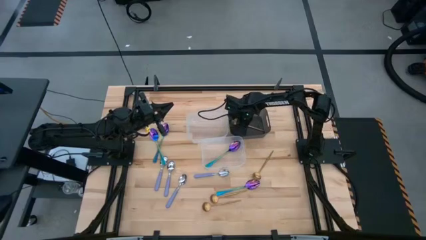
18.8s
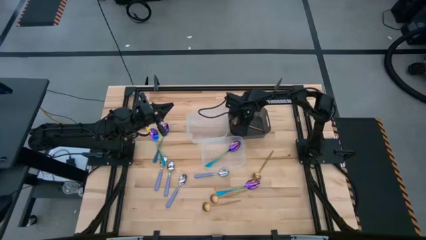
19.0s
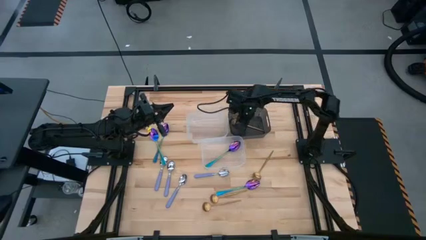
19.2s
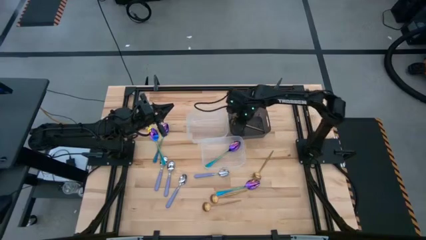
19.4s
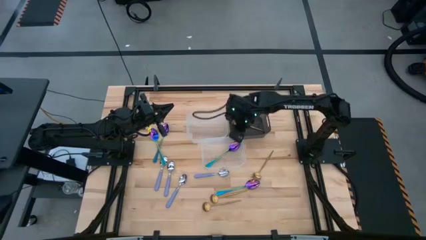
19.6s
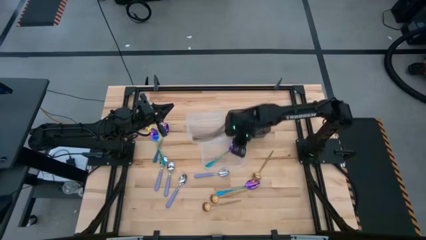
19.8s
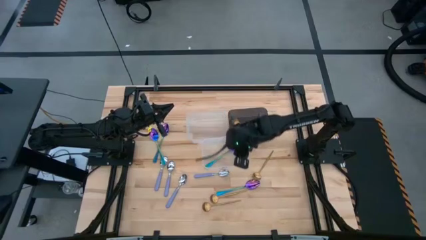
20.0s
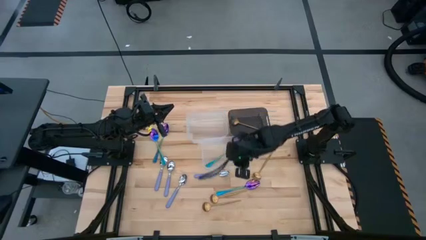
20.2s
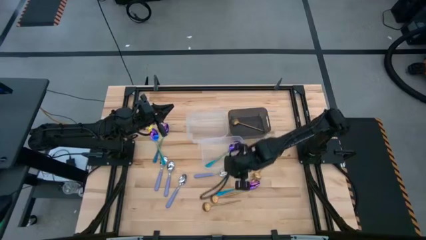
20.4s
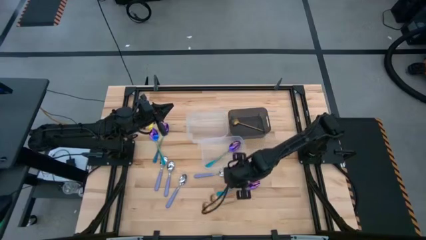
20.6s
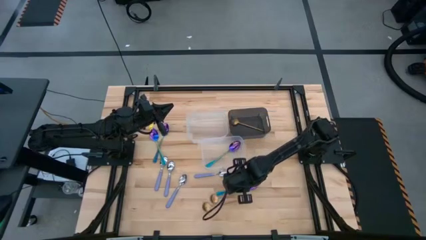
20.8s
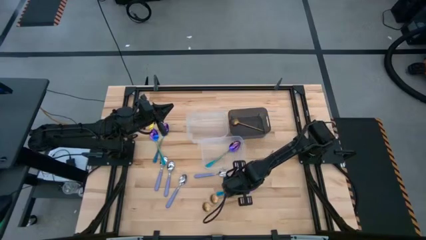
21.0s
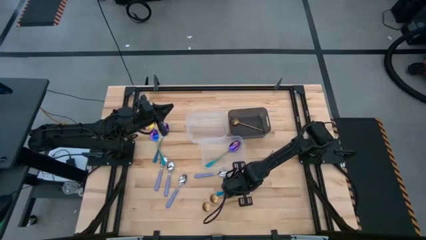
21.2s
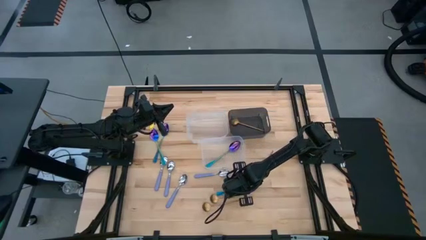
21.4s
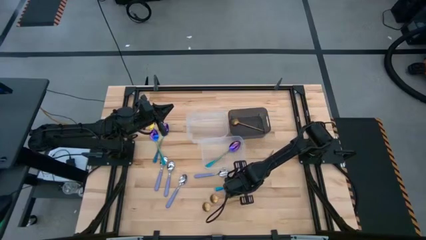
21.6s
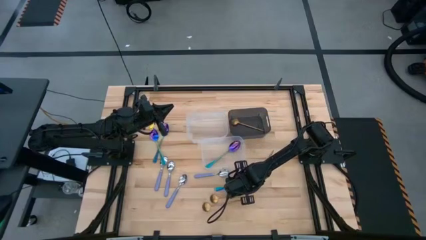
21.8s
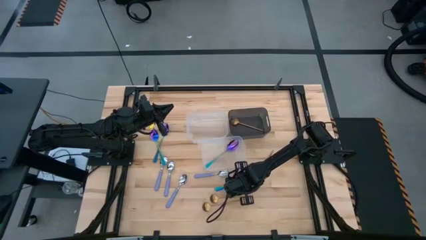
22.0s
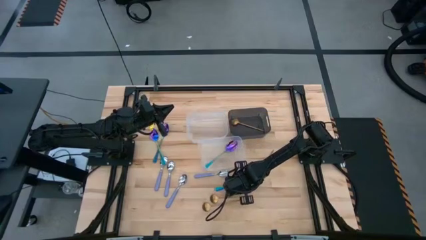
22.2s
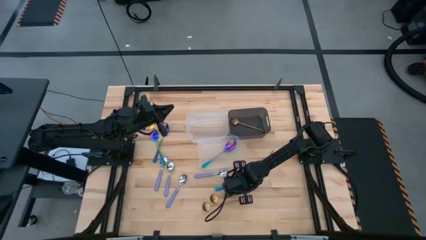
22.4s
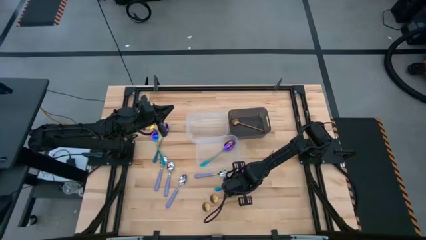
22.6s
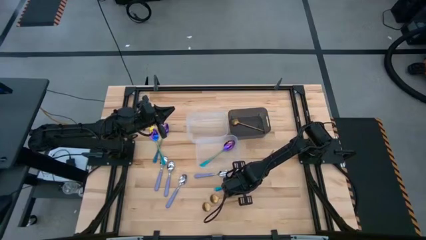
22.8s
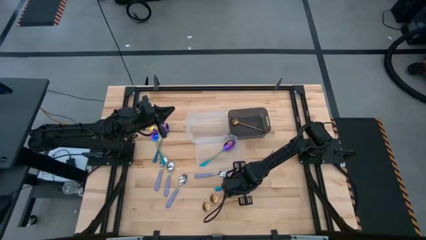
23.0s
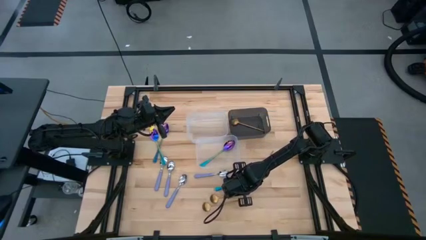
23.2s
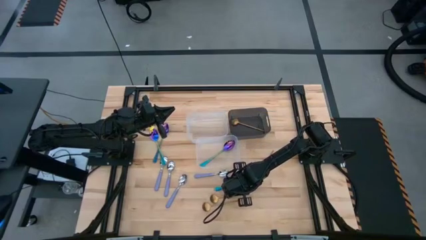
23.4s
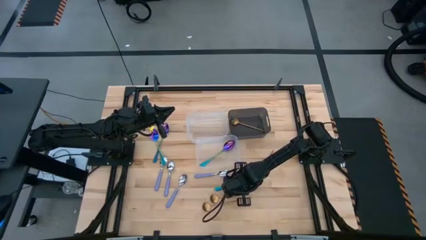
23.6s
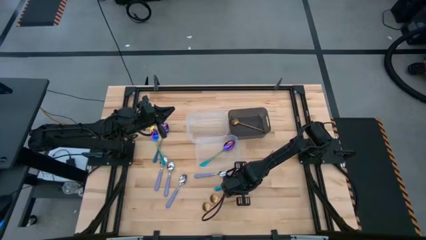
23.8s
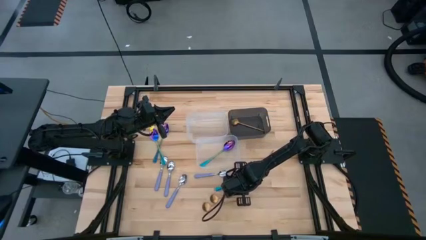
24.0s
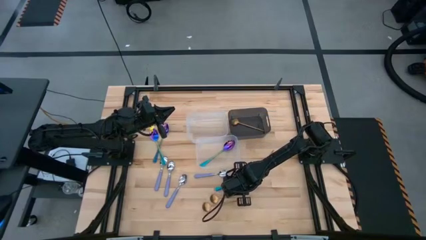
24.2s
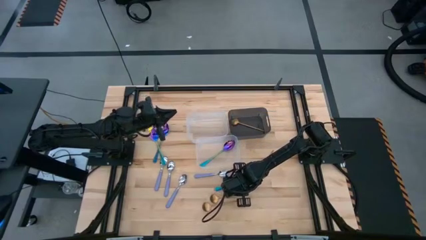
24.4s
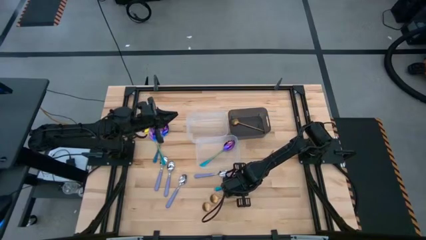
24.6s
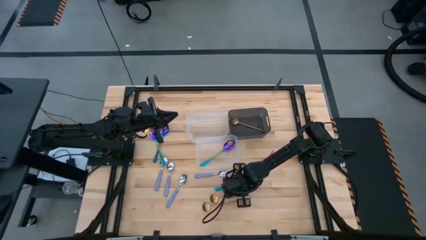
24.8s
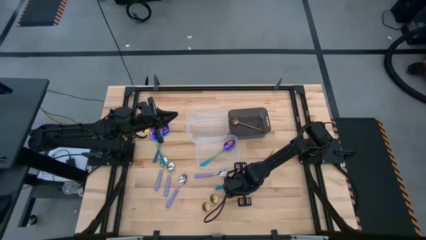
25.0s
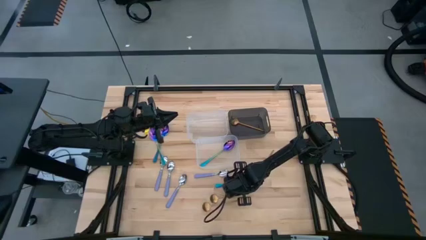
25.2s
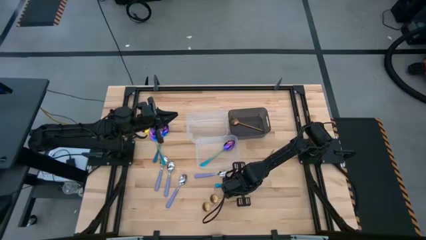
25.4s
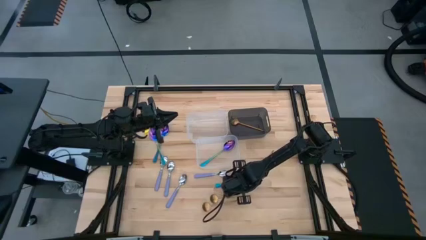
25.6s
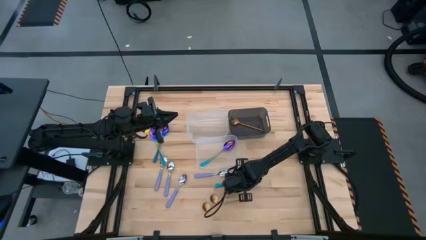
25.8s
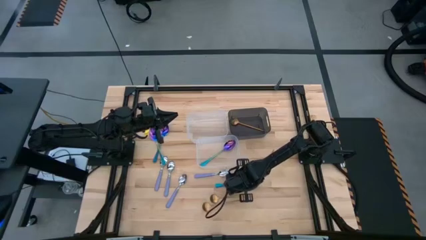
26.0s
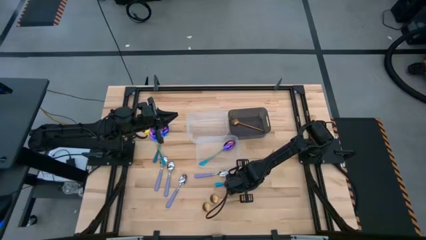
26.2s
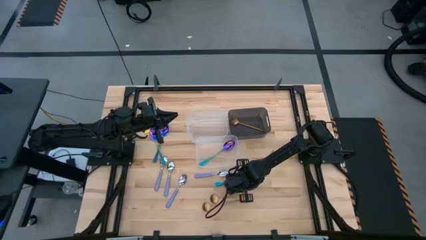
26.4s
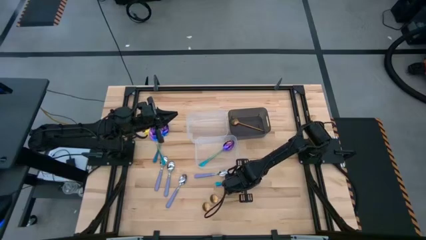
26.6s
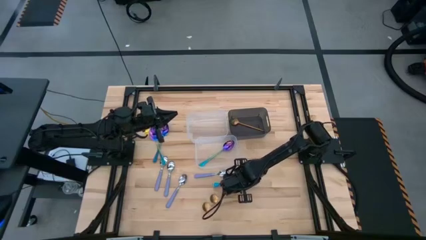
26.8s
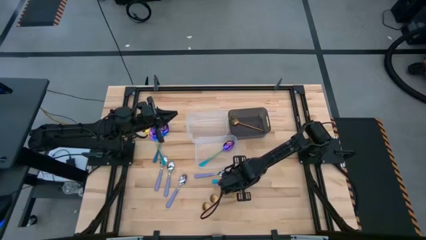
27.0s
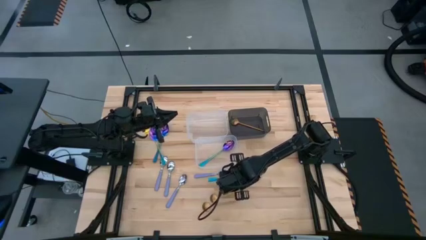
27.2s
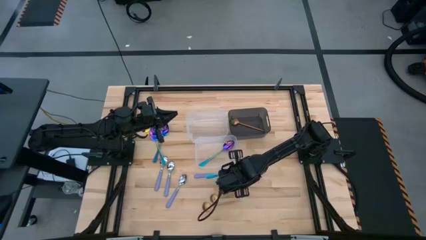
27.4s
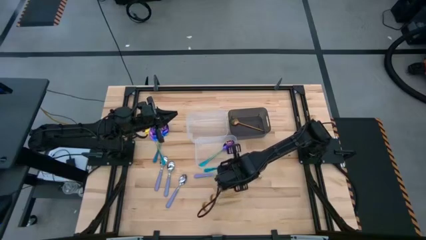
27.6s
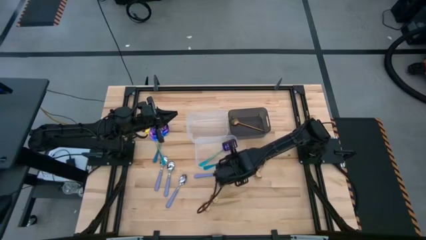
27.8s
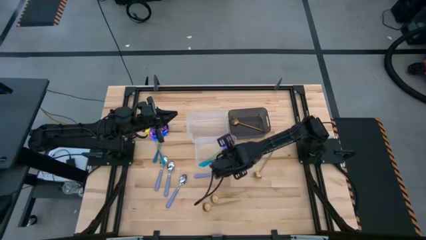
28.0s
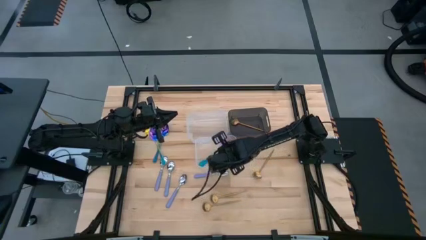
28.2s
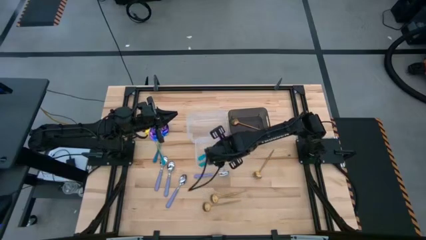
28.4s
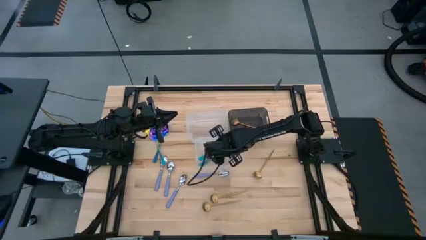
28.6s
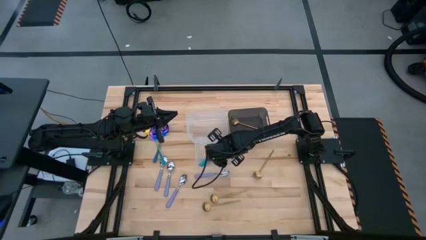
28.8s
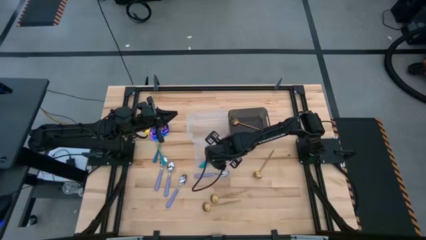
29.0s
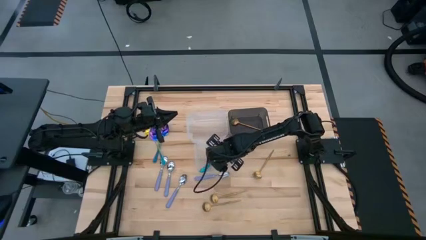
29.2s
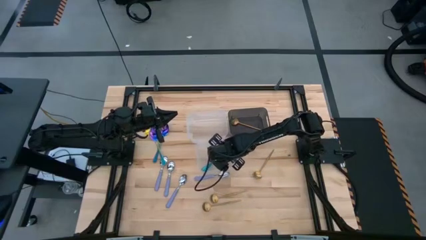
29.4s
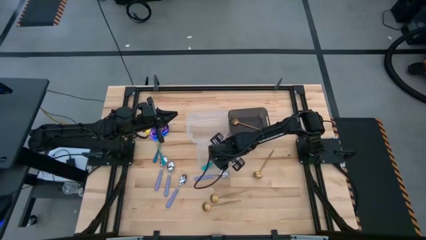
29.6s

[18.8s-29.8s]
Task: Sort silverware by color (type)
Put the purple spoon into the bottom transparent bin

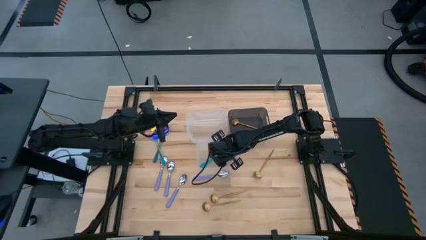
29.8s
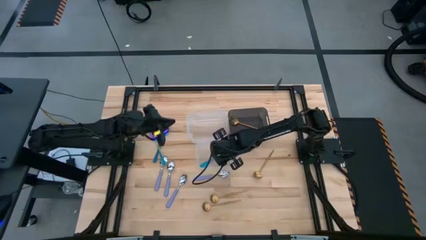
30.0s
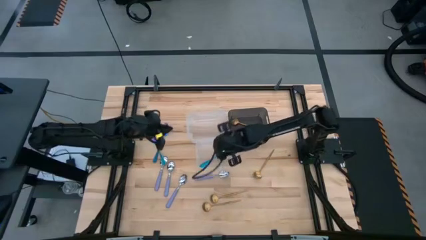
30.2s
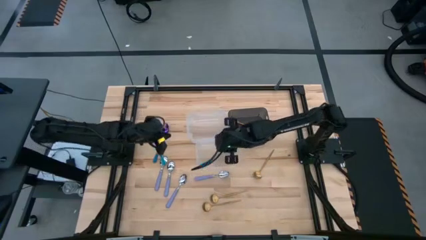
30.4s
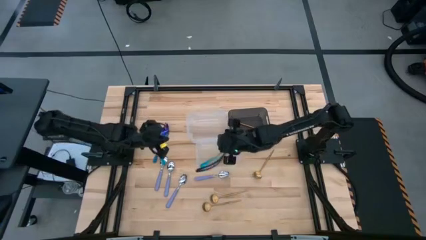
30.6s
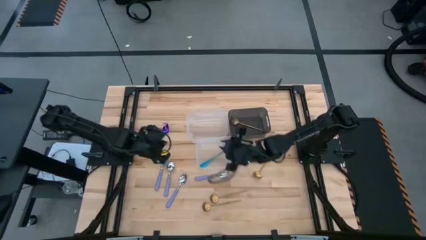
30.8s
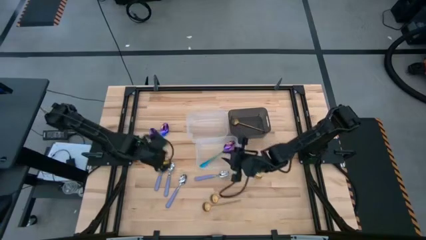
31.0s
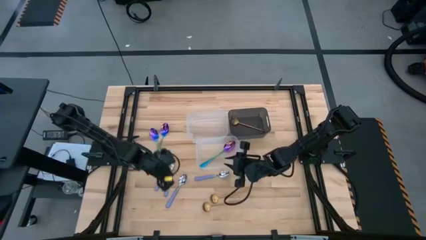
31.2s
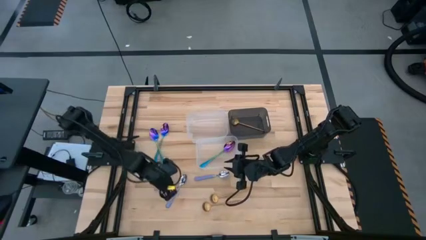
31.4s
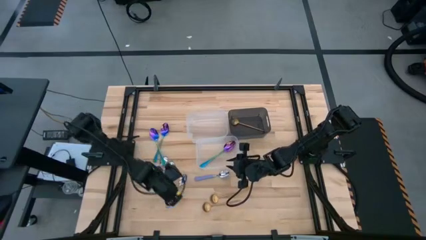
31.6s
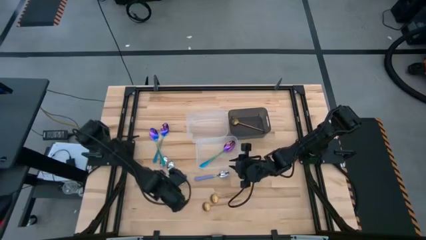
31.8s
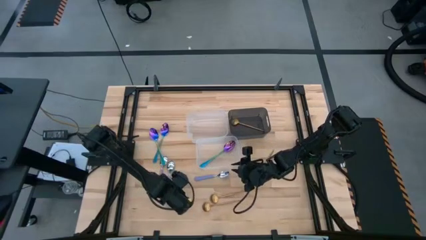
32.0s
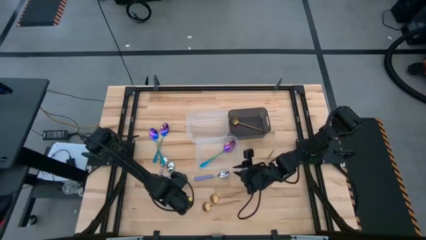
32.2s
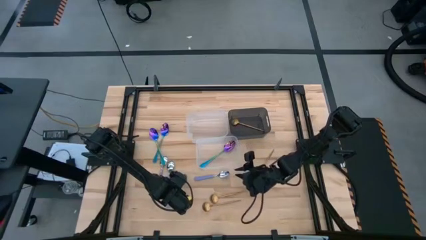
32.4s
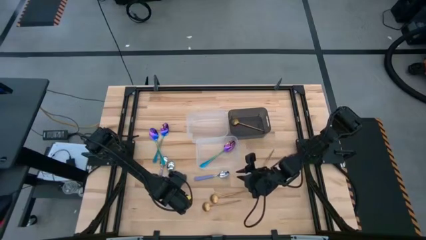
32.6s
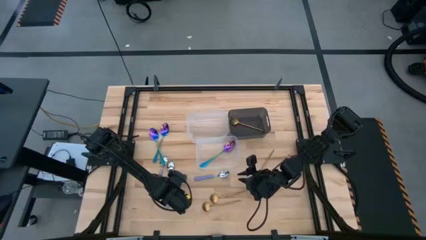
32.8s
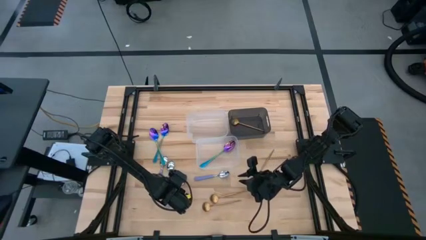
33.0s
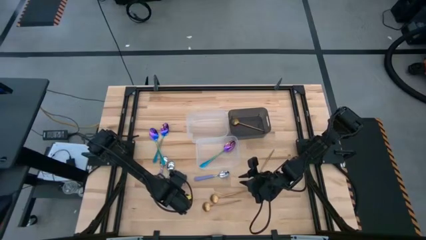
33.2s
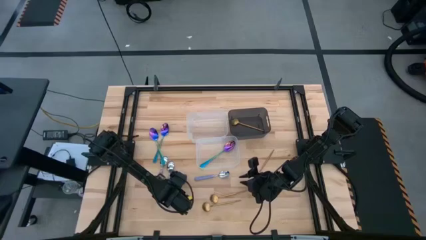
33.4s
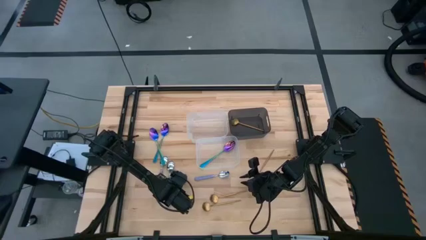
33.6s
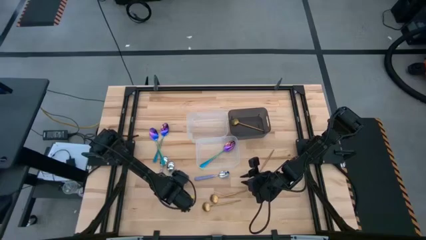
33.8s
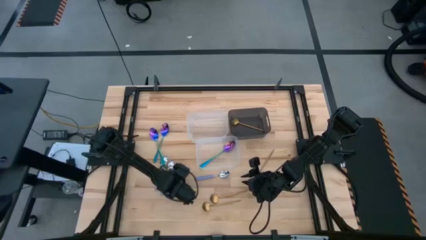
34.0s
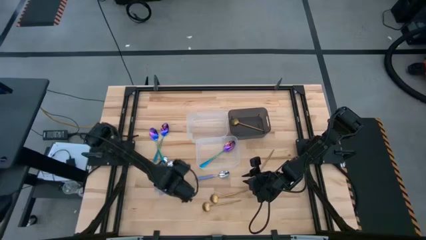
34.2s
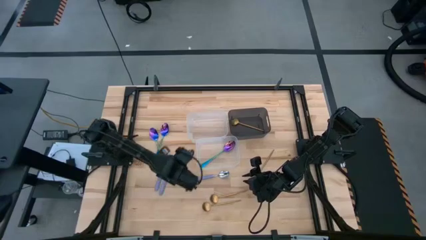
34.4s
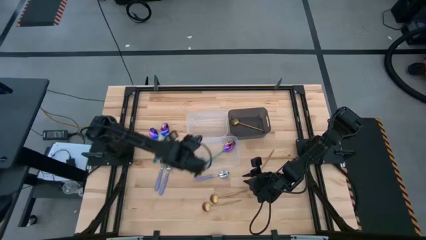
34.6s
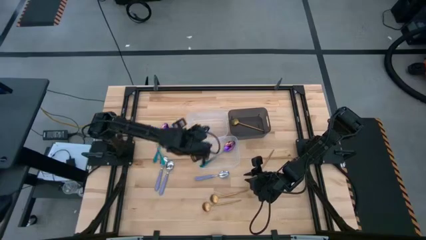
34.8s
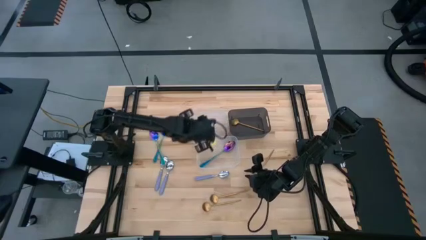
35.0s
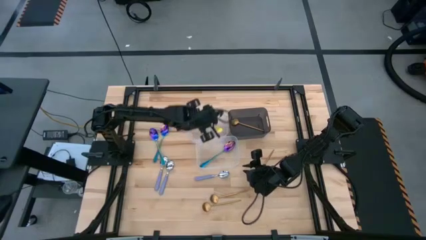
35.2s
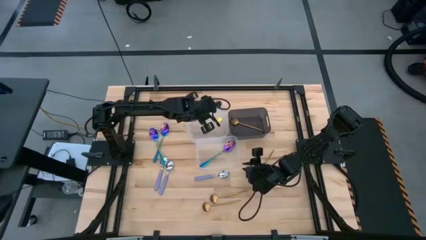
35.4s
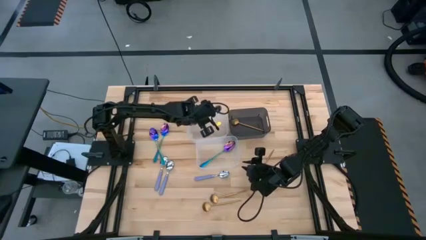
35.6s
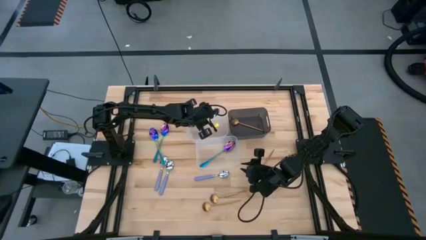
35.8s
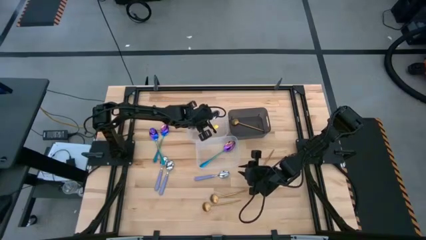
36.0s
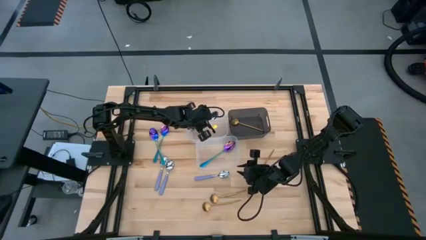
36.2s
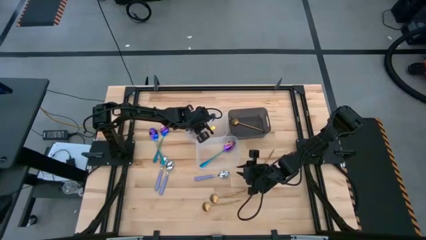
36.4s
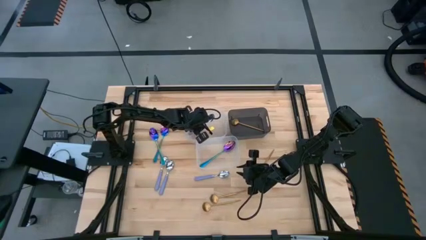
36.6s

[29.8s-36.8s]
Put the blue spoon into the top transparent bin
